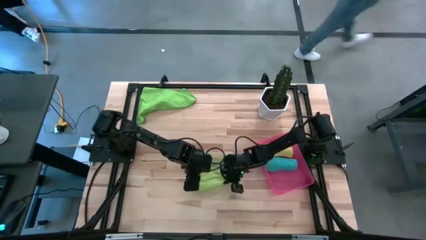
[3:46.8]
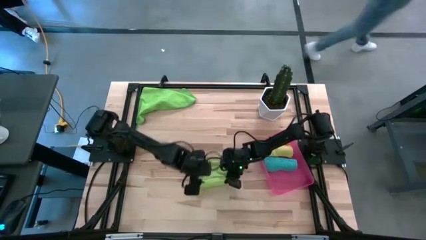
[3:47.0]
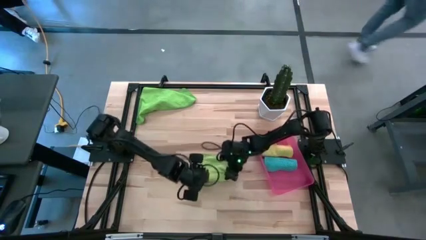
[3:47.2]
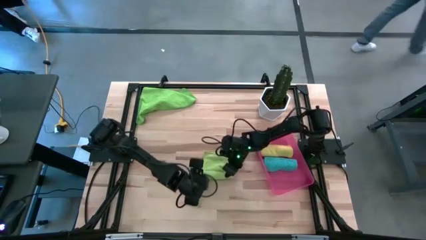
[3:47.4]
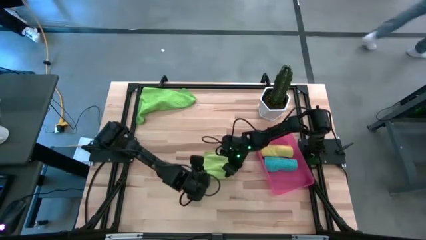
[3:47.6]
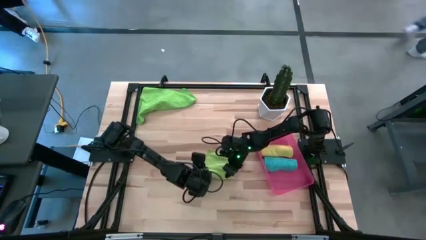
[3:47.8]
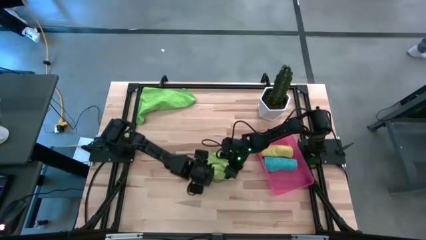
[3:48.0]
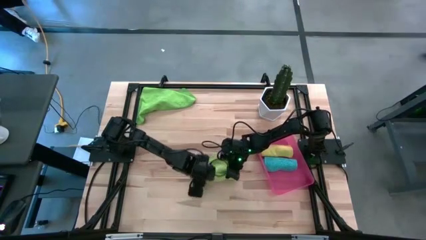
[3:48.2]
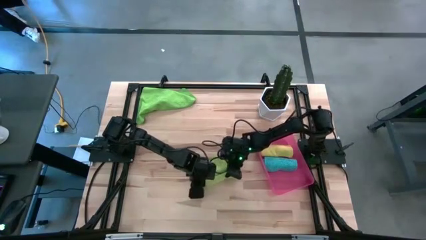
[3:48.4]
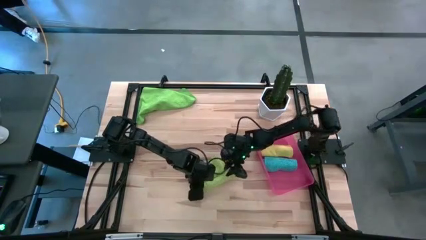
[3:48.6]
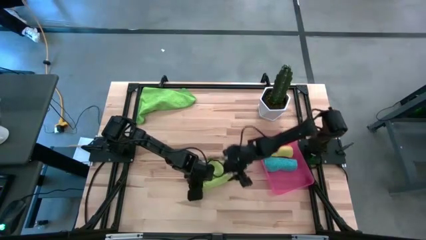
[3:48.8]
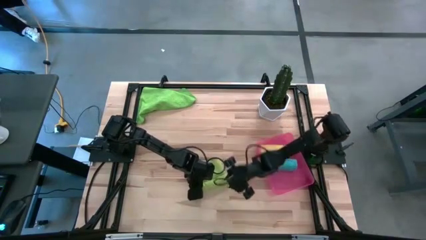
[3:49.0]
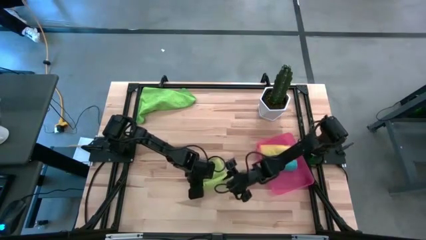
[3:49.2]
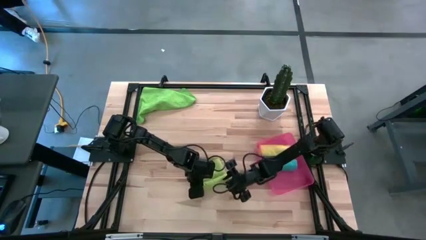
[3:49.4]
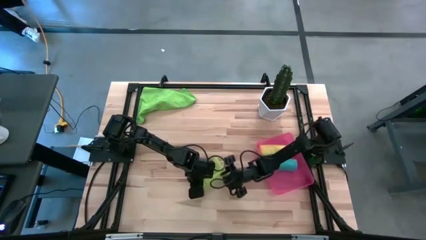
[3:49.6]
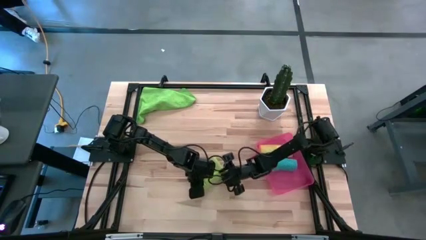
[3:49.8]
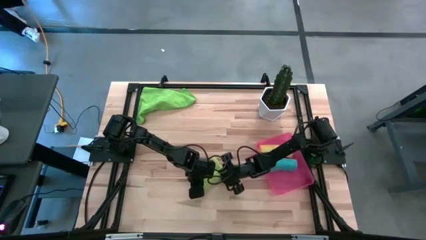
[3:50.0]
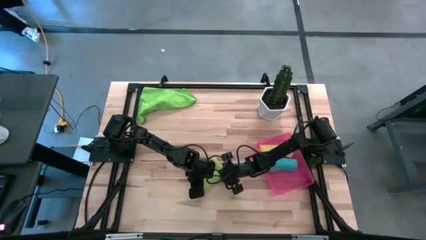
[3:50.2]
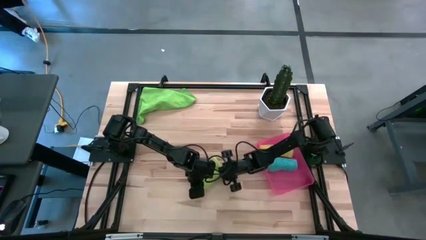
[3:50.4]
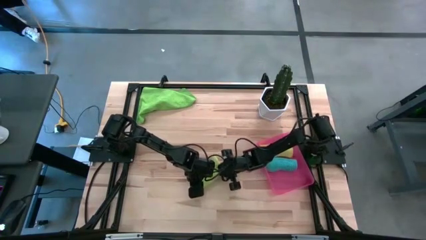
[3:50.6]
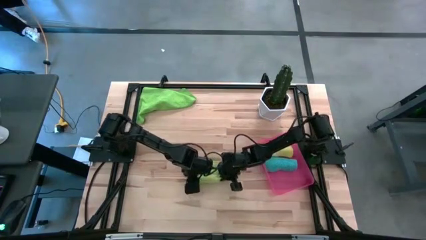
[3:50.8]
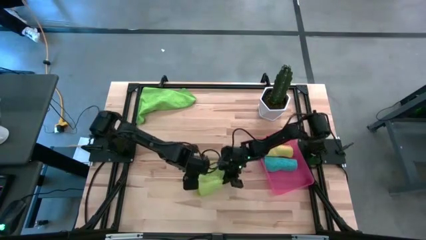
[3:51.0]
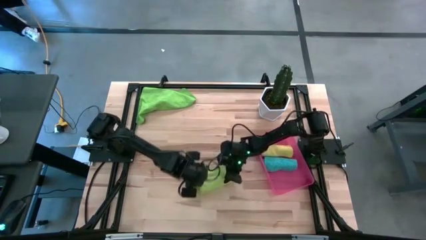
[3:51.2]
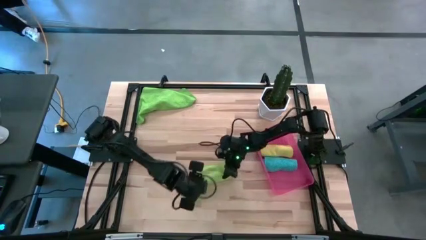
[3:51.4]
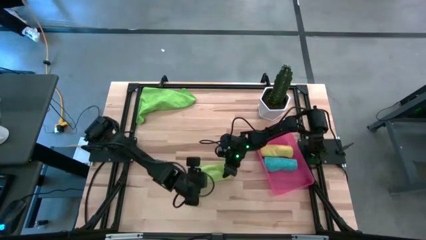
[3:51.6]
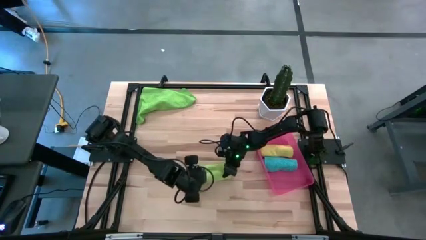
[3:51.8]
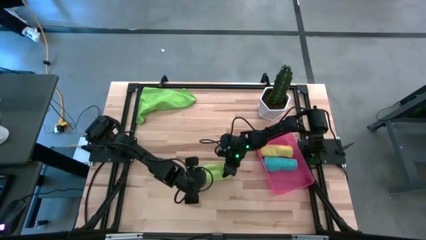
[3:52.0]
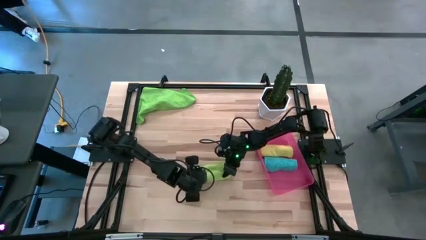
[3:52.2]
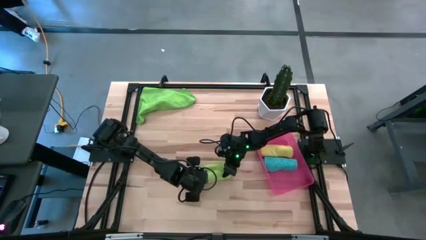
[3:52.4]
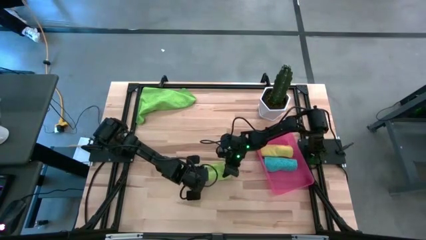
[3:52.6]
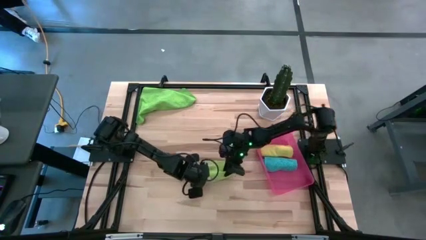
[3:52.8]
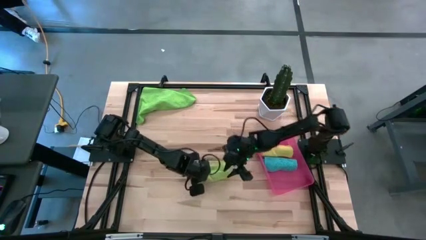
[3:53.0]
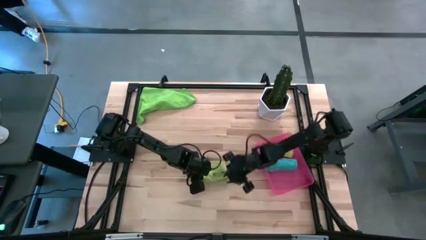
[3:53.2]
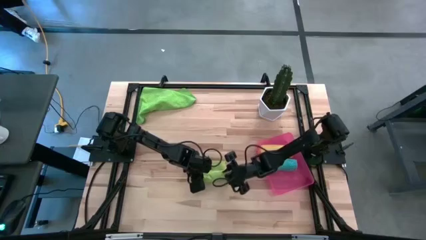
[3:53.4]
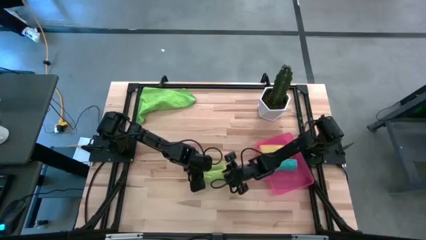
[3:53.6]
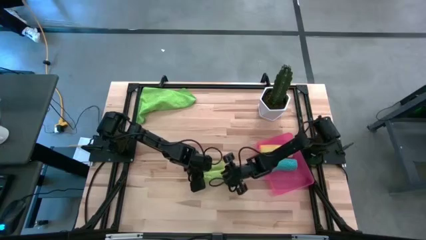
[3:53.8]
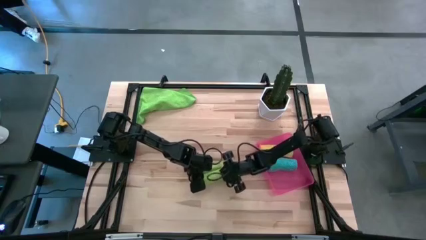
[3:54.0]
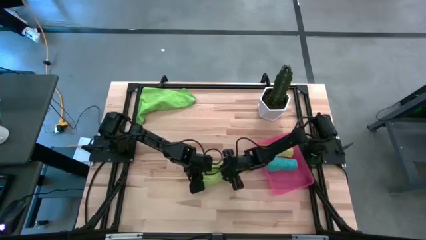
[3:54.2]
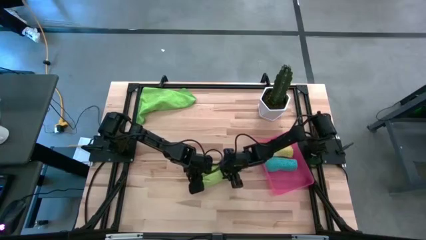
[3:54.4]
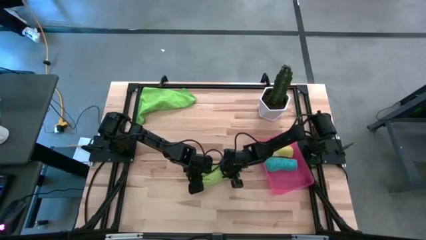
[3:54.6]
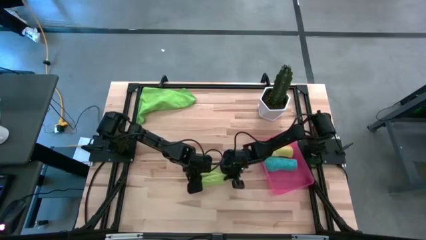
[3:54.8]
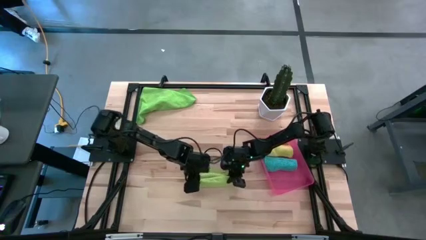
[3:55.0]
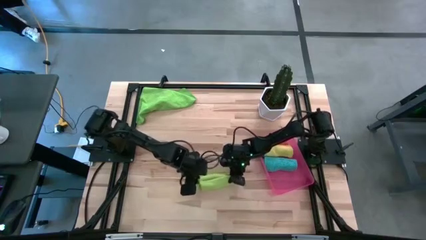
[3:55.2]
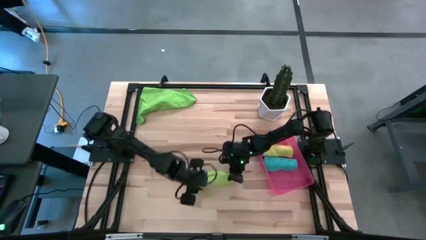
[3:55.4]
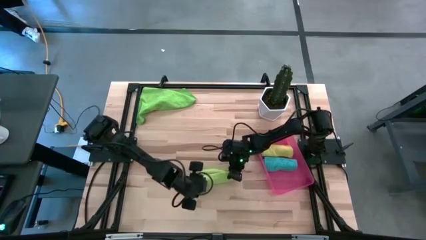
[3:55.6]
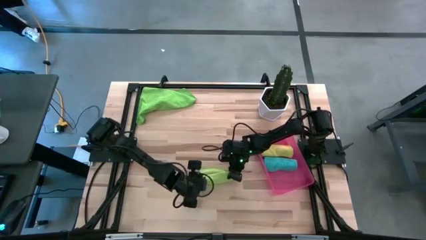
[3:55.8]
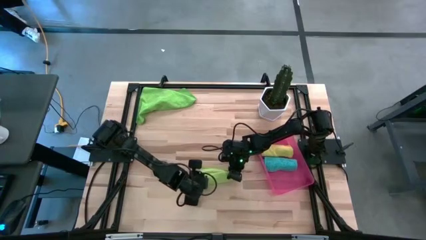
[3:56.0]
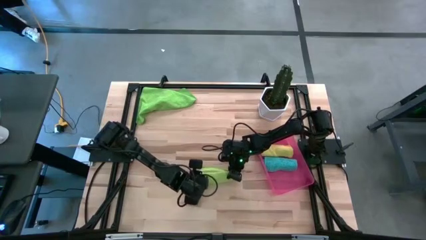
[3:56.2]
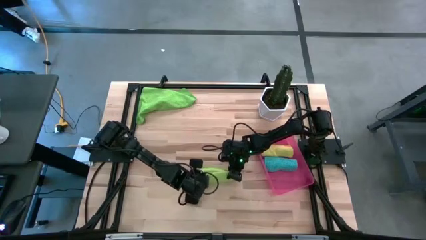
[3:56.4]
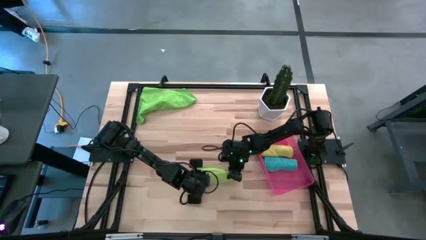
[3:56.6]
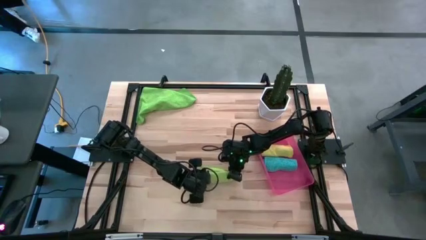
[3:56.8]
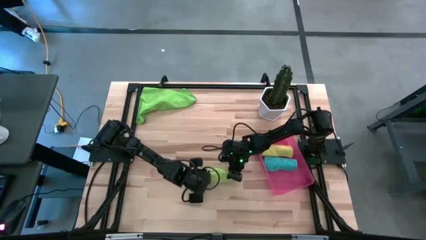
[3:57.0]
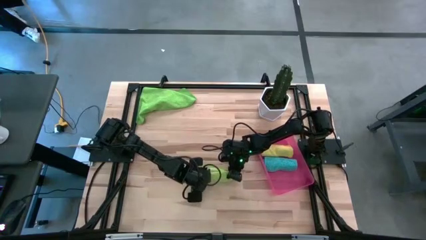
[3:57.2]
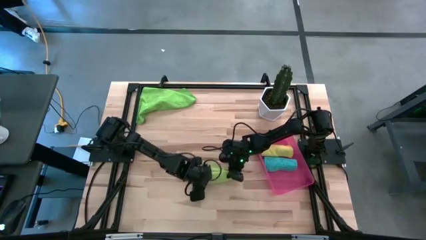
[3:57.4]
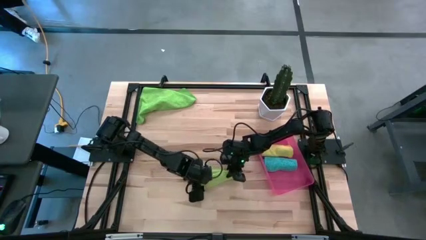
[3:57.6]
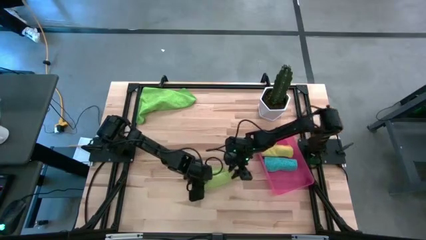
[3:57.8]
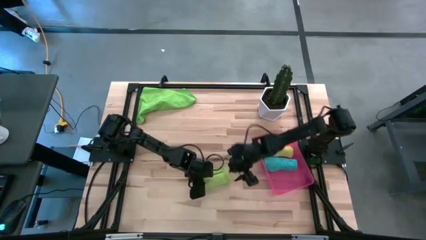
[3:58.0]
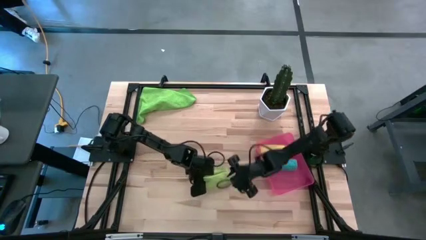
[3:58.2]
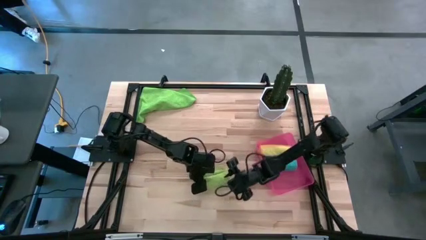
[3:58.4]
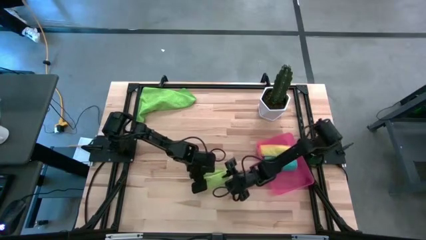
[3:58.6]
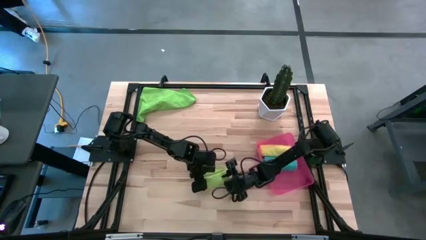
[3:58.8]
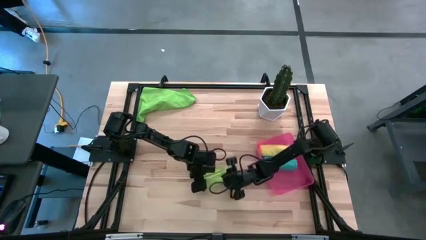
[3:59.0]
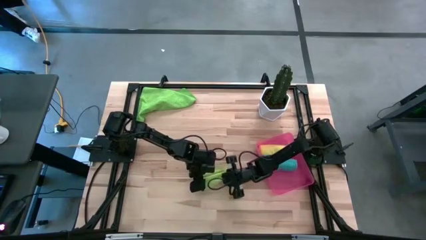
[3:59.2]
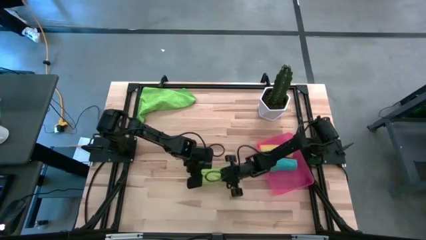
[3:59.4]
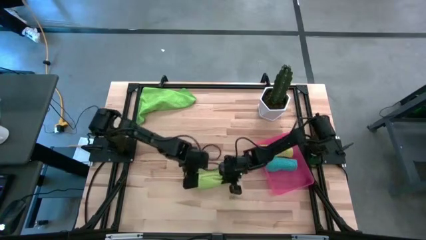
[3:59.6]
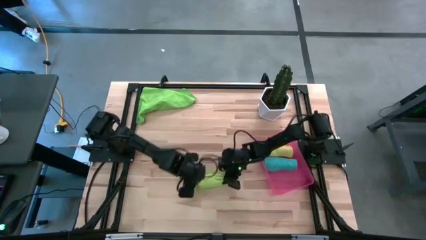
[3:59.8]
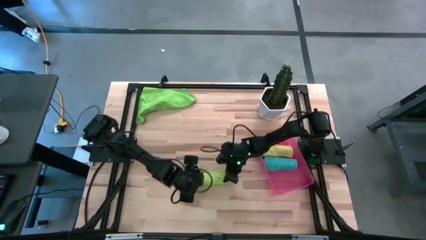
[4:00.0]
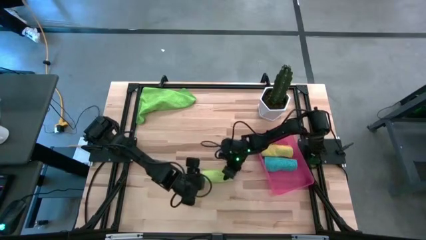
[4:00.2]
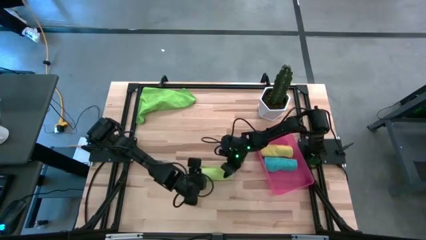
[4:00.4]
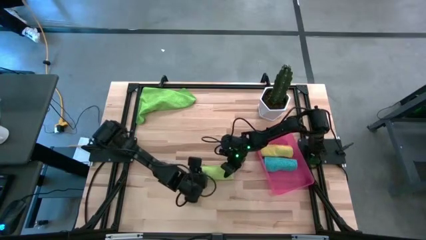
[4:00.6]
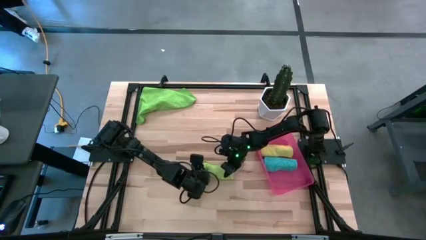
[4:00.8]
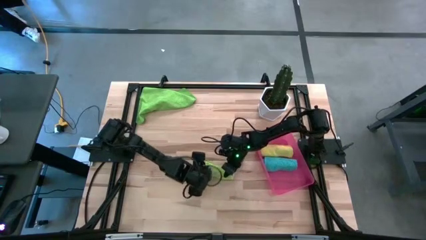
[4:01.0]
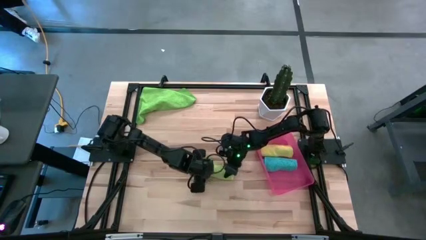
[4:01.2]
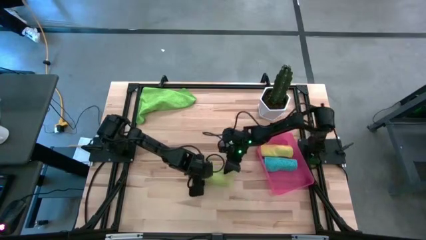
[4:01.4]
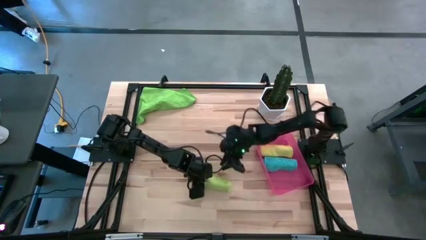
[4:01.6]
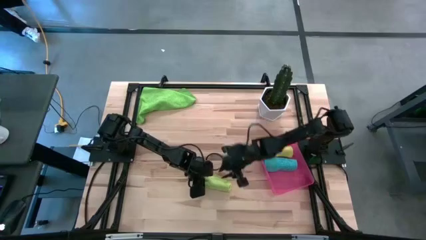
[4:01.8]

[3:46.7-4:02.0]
Task: Roll microfiber towels into tight, uniform cylinder then place into a basket
Roll the bottom light green microfiber towel
